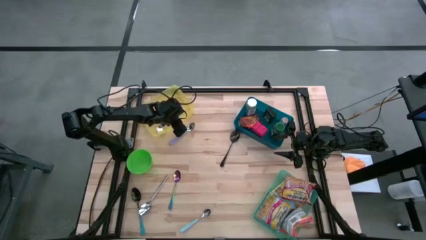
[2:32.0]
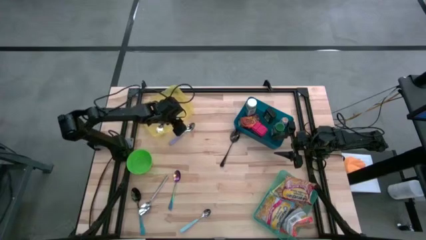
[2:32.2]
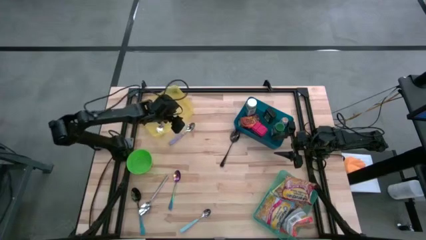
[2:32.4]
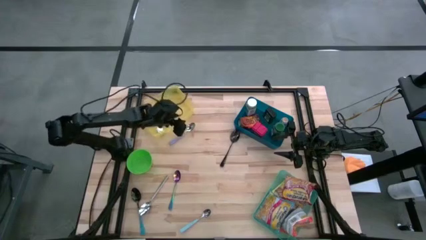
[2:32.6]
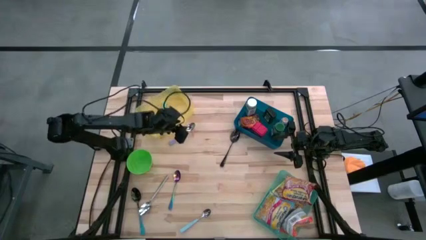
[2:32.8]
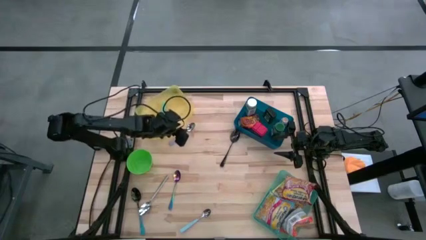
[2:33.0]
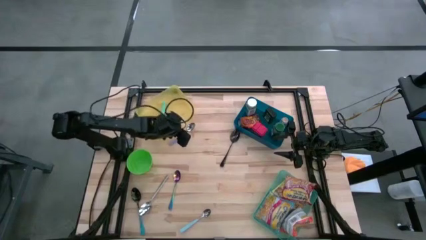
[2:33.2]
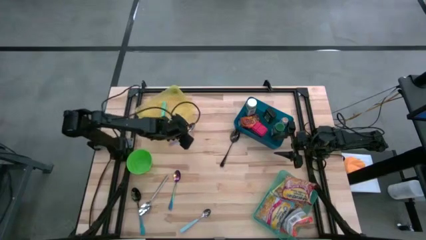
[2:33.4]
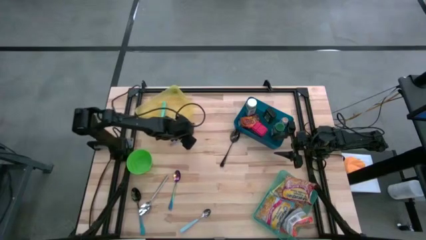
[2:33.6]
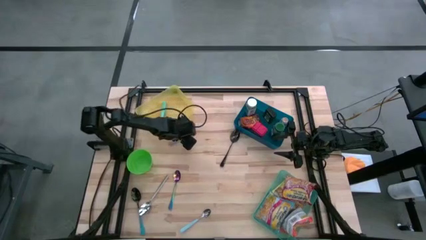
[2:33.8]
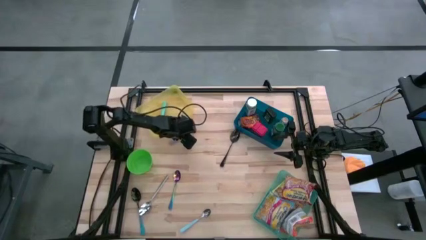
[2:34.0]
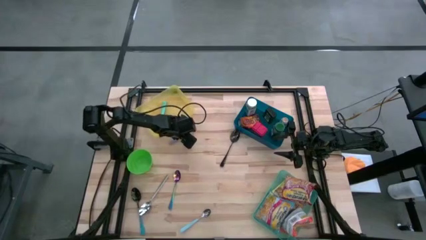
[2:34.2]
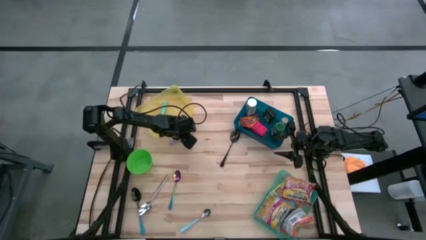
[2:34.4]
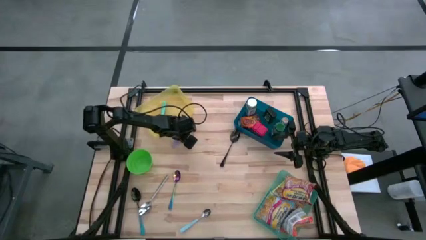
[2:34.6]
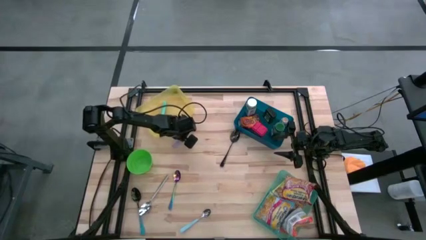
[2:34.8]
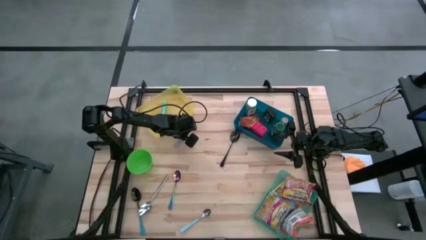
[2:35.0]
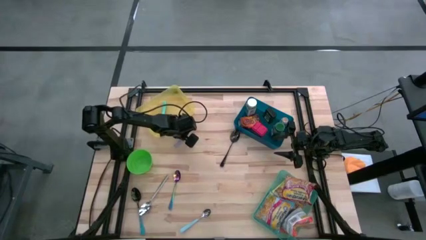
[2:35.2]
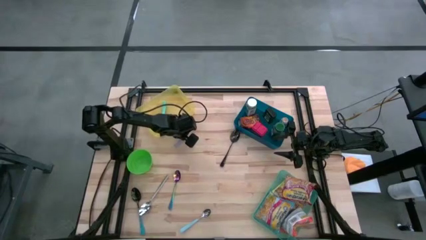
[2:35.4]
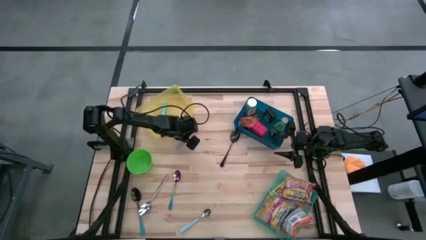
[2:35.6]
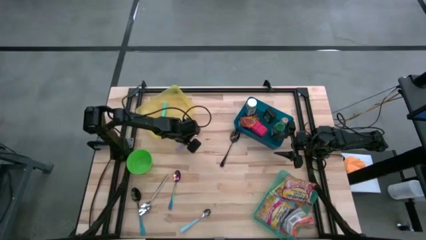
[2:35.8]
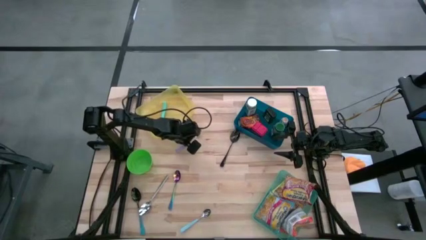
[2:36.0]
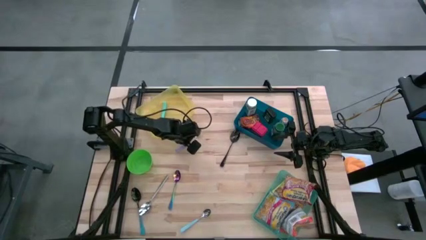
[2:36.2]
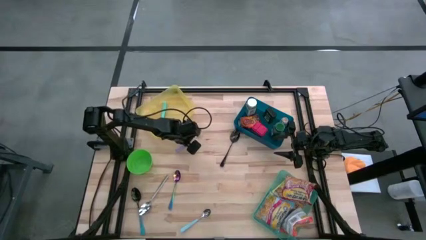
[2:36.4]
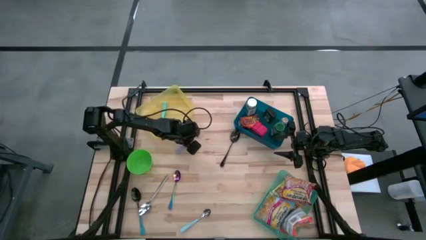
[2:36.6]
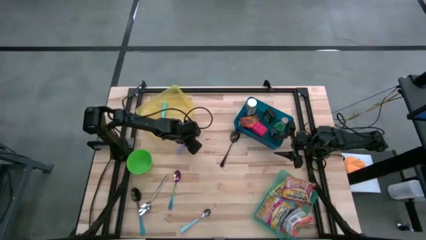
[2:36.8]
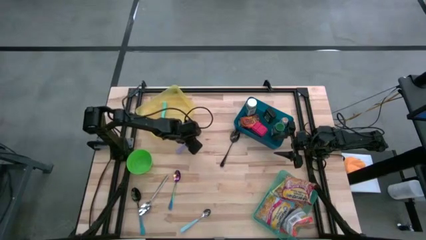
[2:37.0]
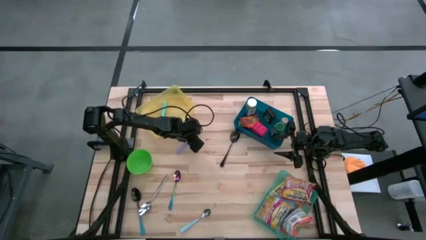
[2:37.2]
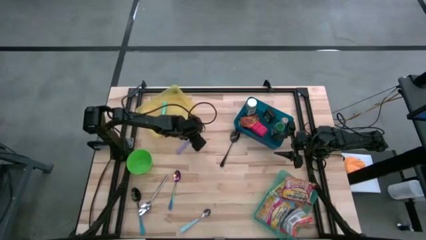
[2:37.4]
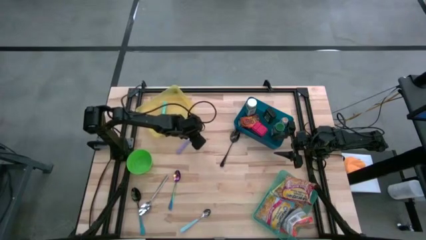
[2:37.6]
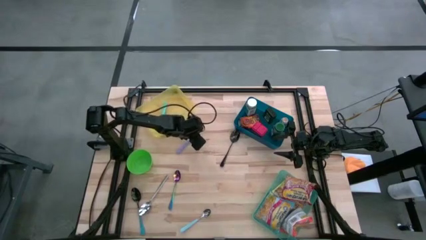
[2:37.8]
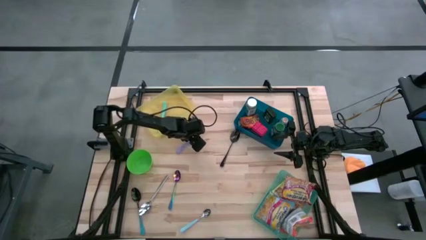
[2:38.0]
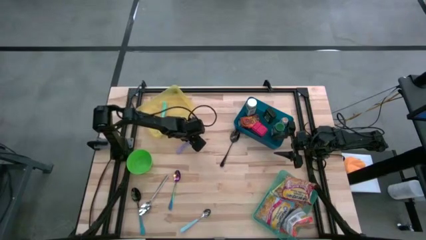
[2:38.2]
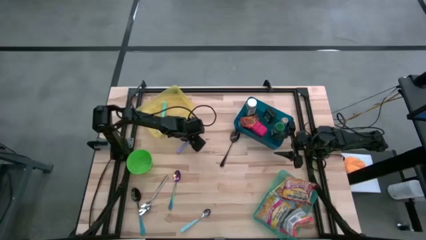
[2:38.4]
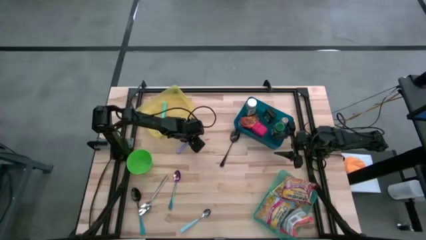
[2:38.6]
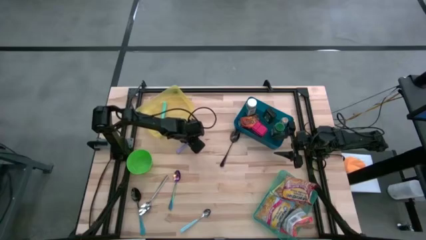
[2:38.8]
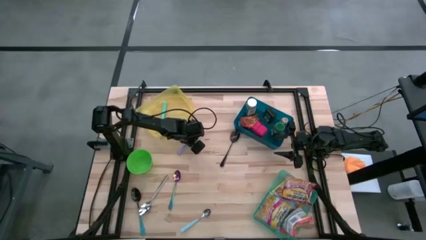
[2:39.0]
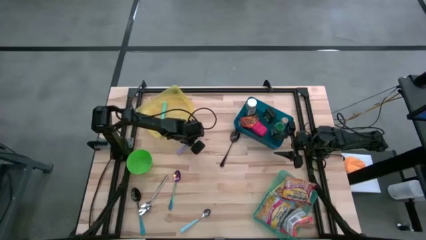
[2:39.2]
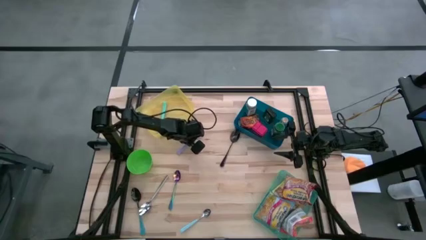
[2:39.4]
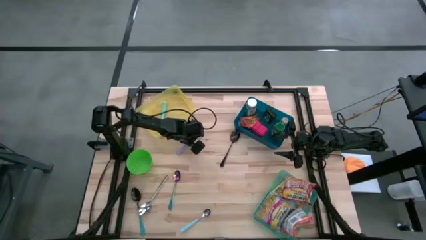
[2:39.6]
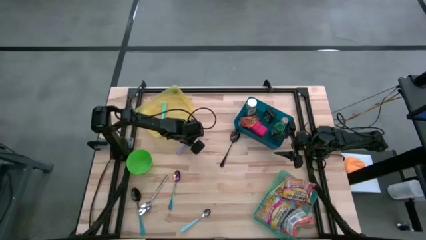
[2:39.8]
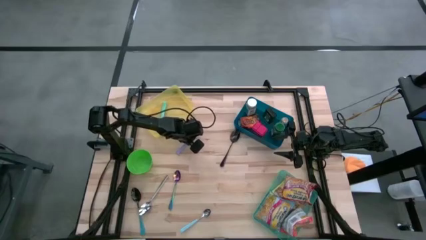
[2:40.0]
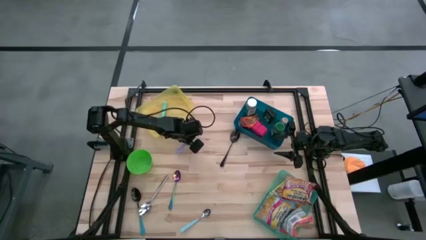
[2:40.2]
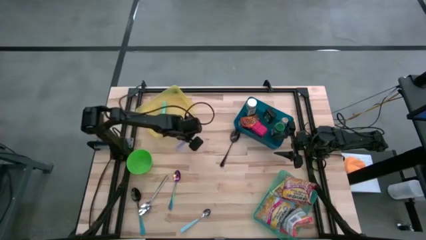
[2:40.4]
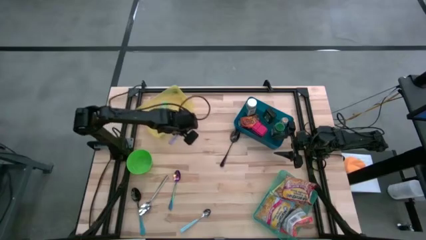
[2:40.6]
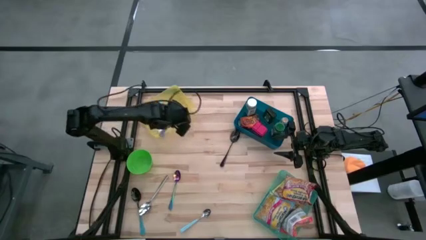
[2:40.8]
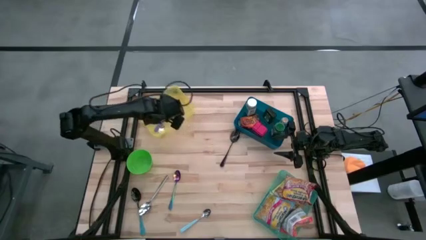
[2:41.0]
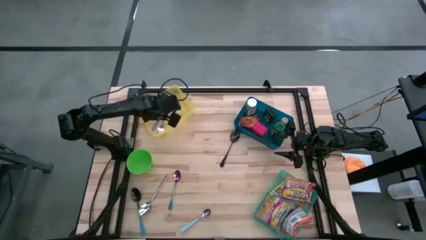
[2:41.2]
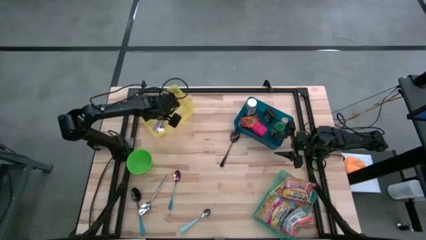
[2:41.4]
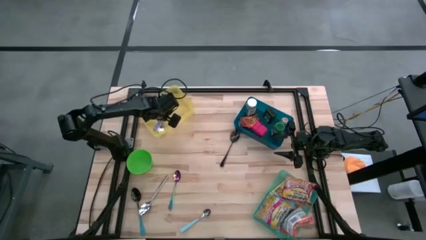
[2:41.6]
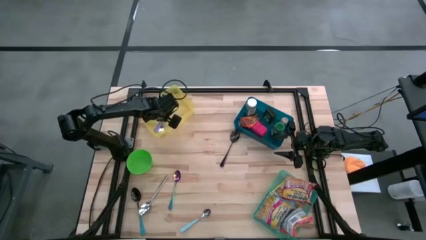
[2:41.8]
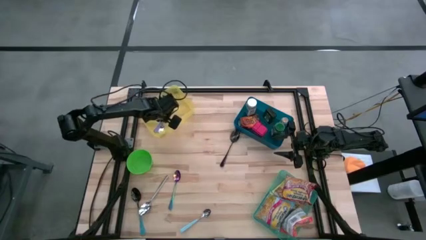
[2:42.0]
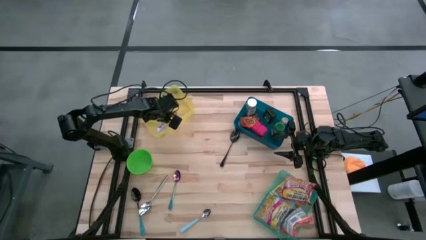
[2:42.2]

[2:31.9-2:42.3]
Put the purple spoon into the yellow bin
